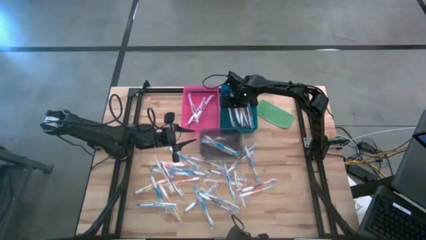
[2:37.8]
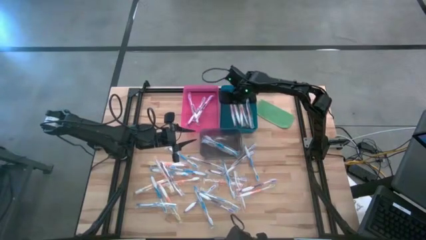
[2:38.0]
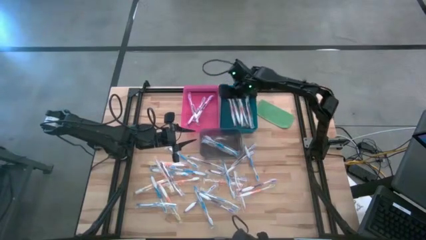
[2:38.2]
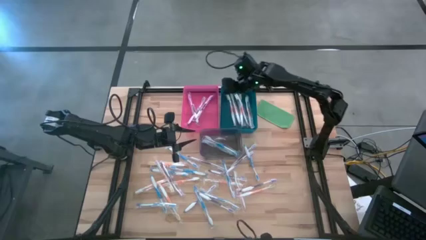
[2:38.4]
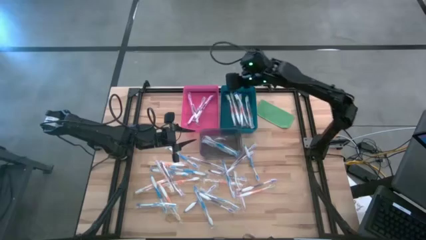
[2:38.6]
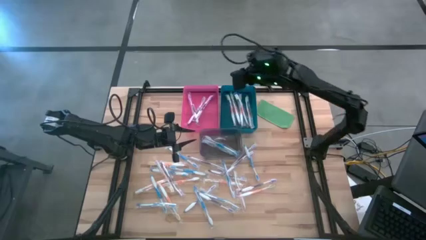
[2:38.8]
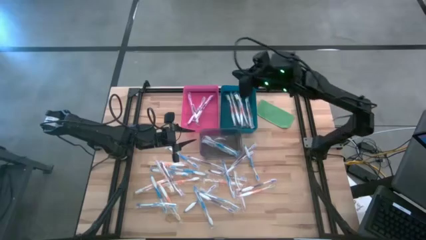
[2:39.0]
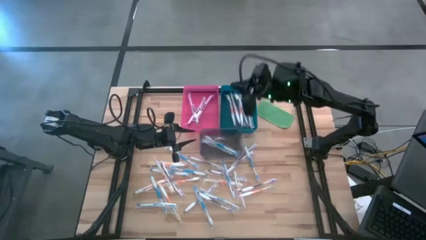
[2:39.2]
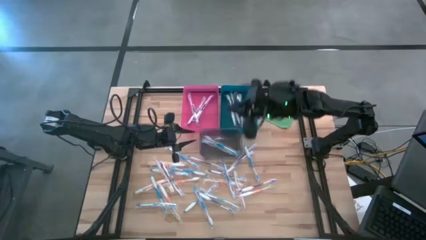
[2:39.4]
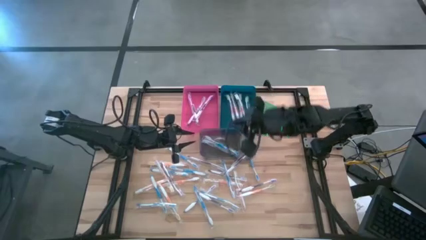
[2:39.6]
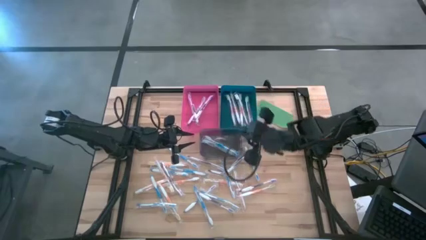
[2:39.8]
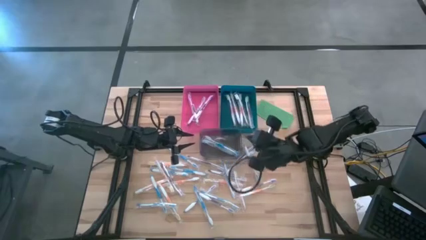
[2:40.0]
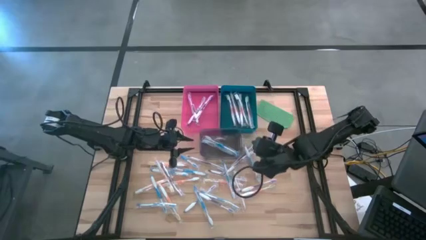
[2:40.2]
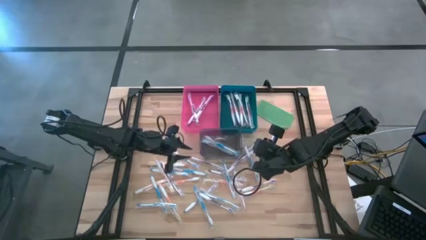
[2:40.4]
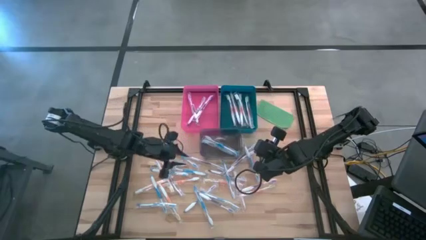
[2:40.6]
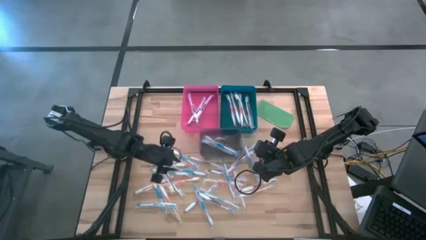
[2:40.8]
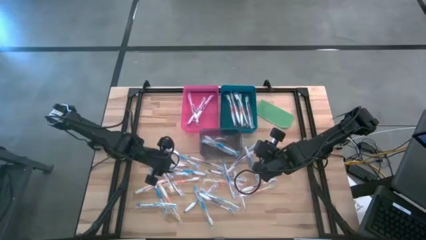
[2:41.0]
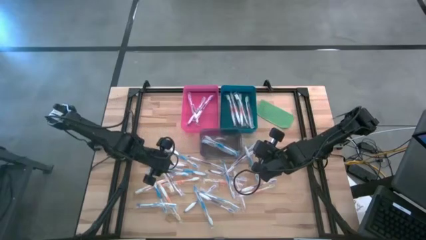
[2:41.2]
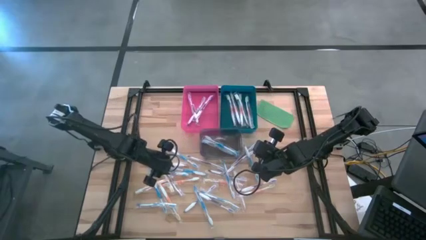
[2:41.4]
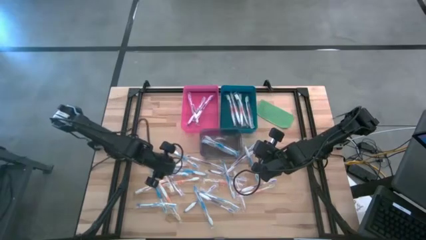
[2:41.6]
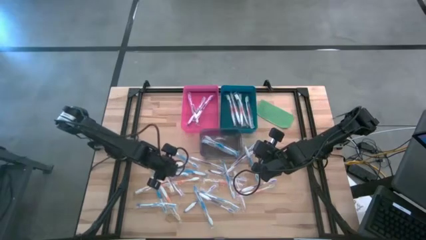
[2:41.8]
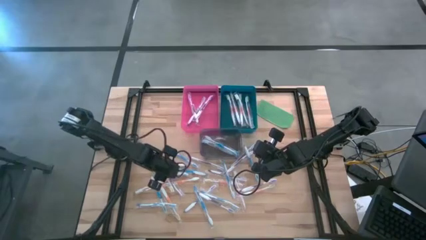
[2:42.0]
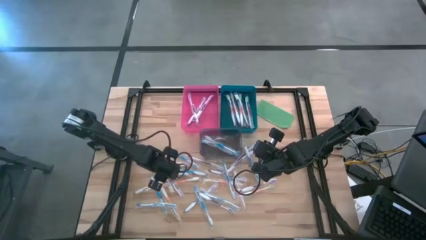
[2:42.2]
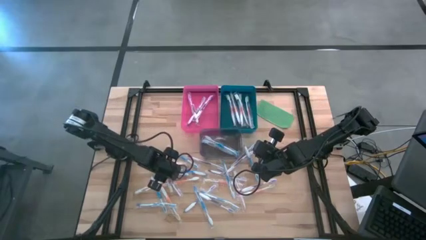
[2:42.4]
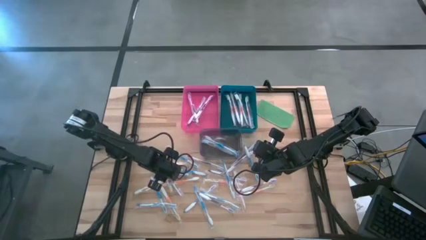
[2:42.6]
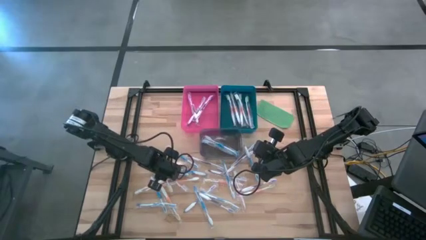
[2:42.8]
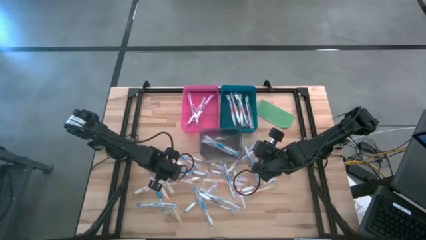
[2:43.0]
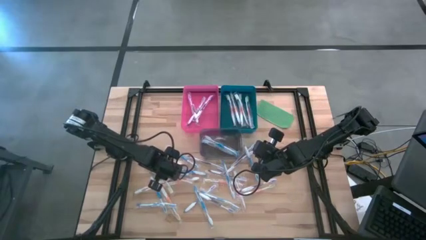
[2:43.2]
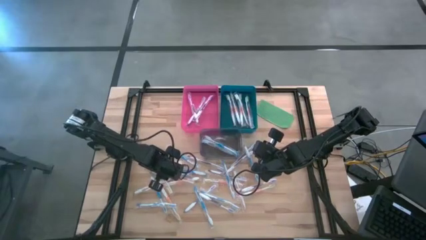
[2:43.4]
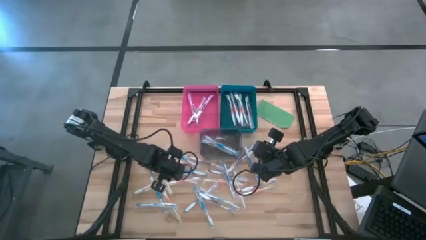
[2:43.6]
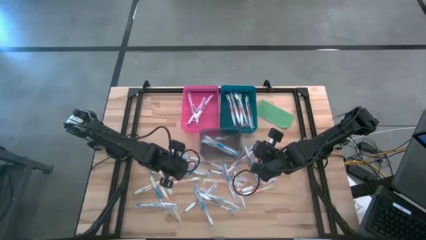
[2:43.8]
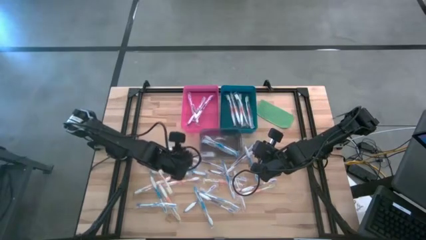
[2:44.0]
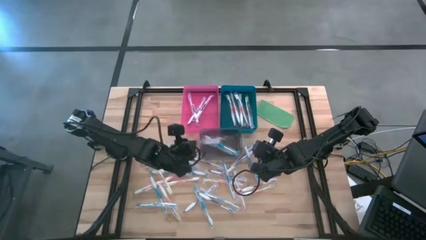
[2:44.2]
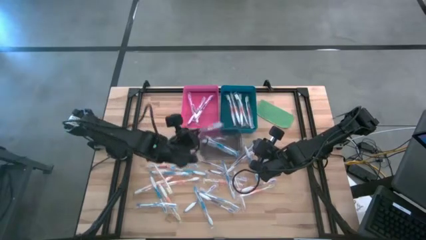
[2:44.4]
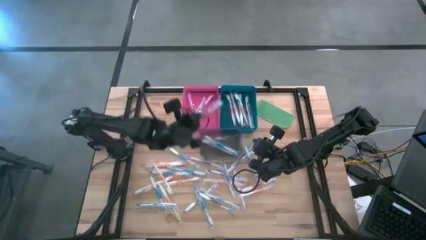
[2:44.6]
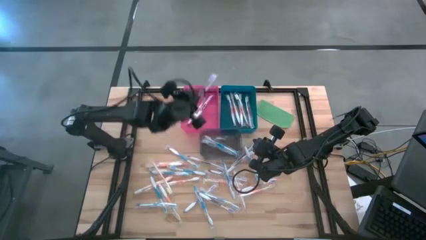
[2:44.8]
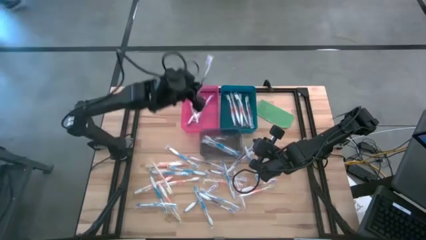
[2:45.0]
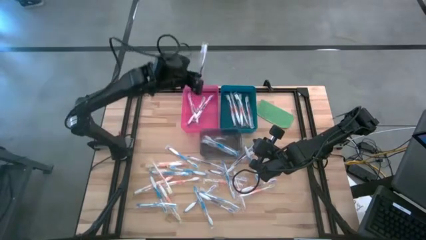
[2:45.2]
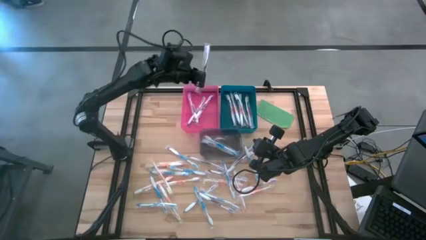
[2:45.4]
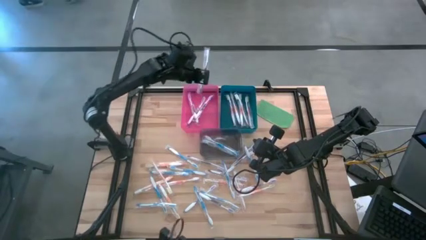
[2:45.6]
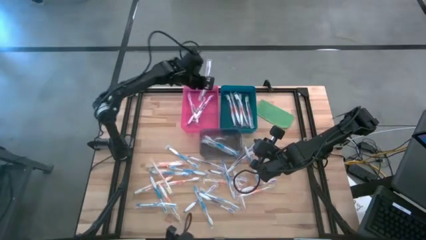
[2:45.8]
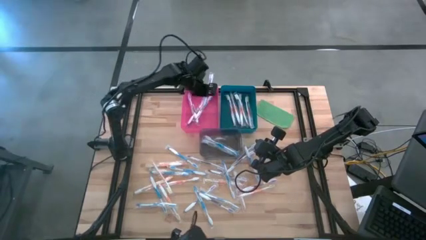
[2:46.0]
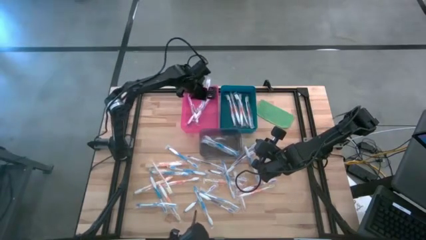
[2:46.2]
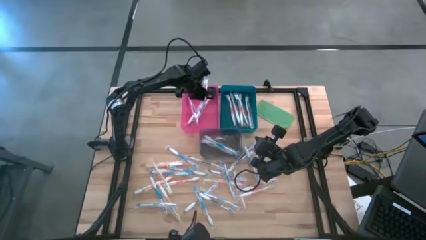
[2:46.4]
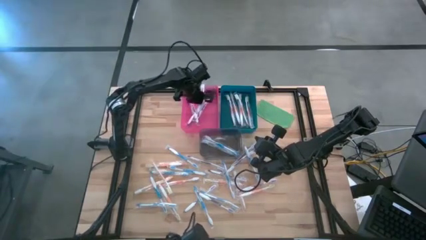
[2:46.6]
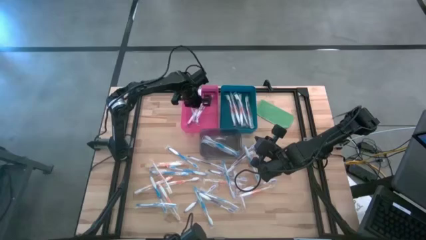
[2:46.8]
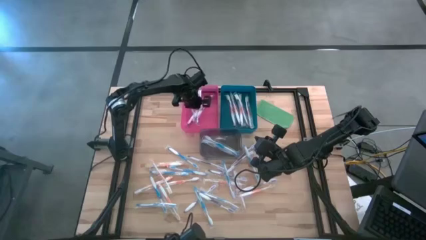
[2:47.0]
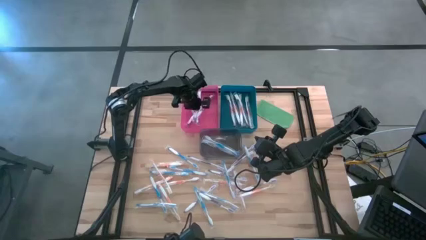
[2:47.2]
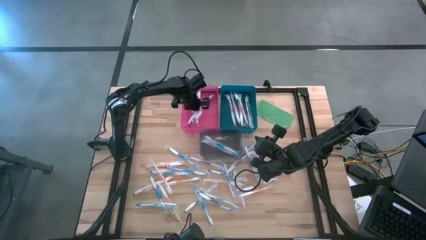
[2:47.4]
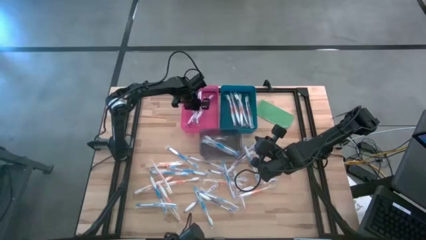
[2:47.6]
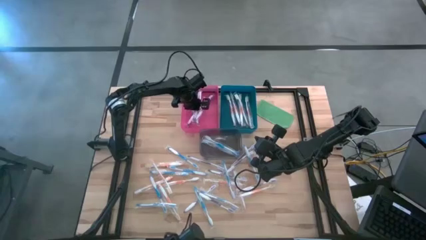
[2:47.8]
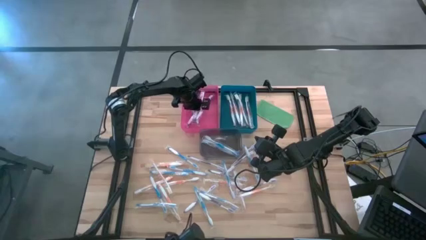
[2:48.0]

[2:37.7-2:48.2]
Task: Pick & Place Toothbrushes
Put the purple toothbrush into the pink bin

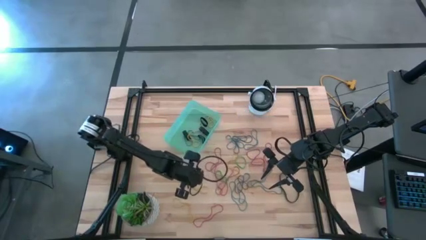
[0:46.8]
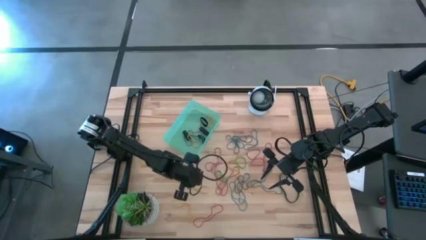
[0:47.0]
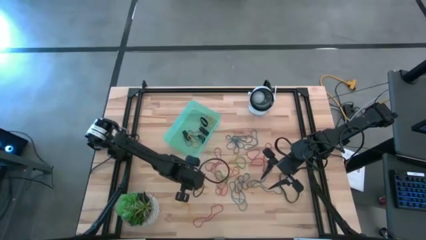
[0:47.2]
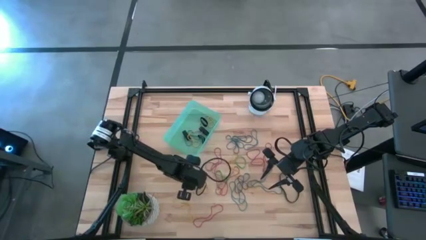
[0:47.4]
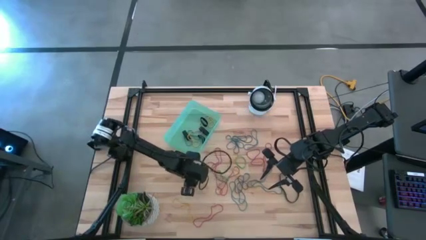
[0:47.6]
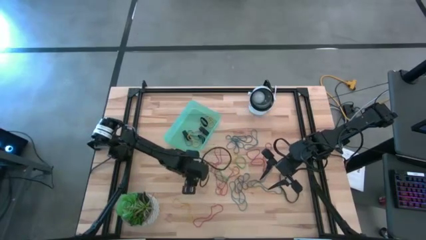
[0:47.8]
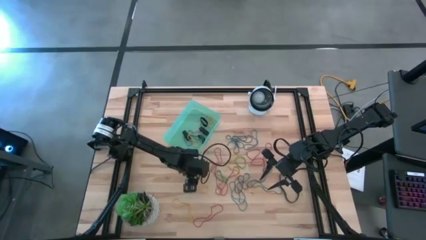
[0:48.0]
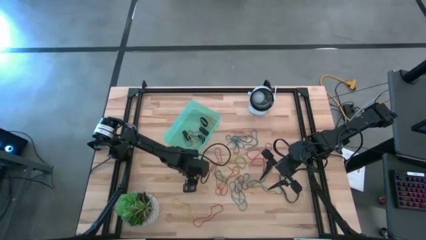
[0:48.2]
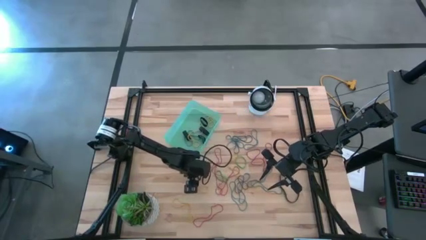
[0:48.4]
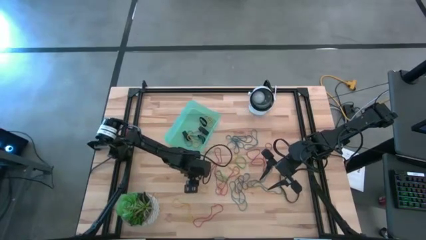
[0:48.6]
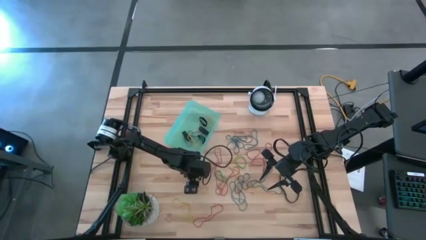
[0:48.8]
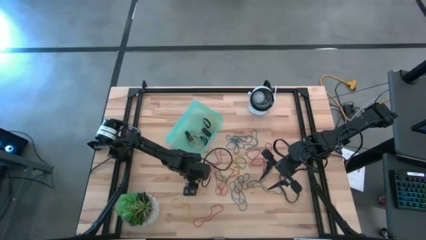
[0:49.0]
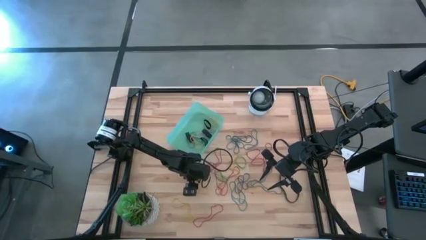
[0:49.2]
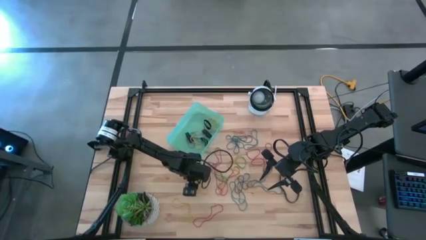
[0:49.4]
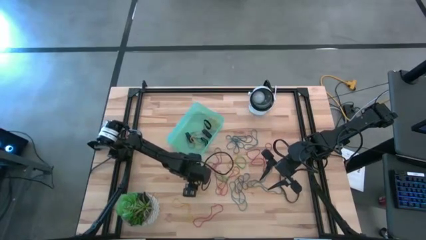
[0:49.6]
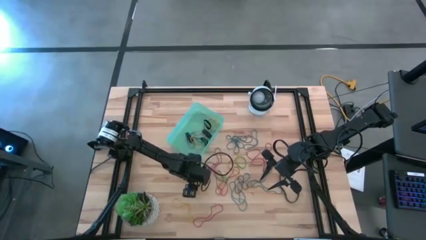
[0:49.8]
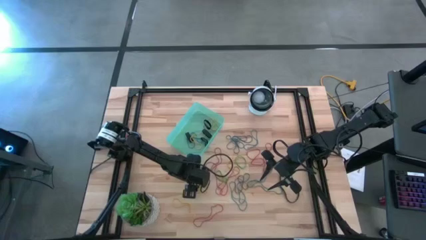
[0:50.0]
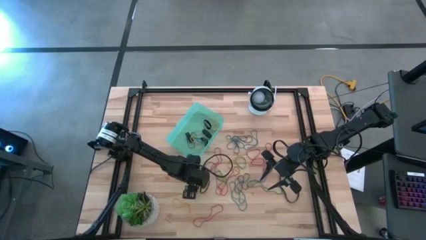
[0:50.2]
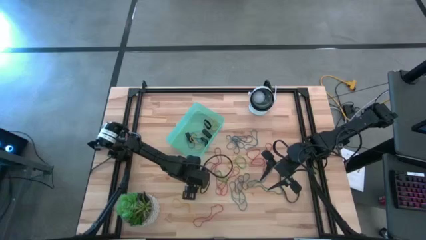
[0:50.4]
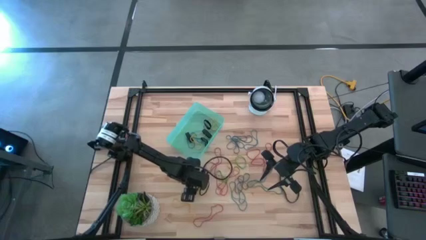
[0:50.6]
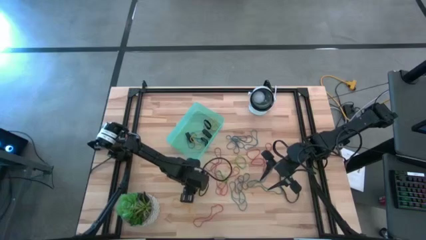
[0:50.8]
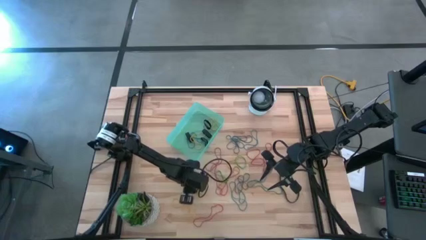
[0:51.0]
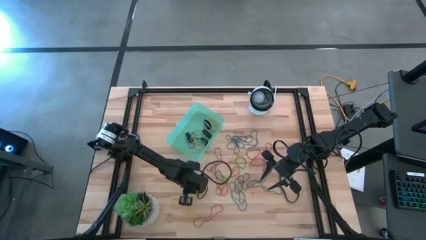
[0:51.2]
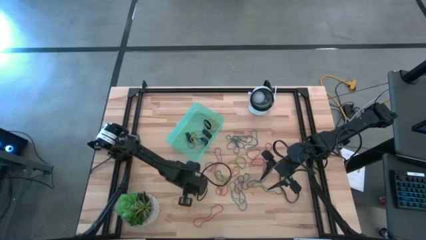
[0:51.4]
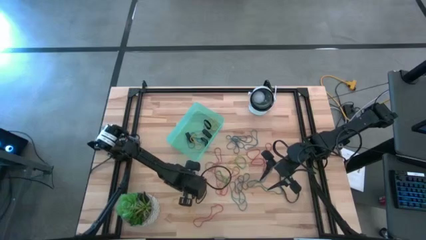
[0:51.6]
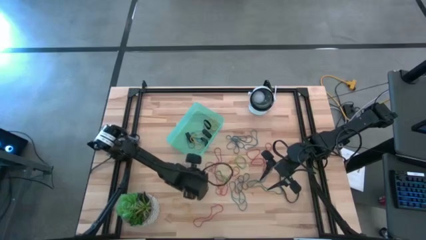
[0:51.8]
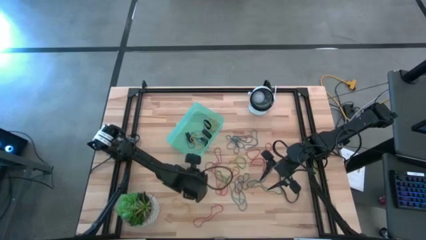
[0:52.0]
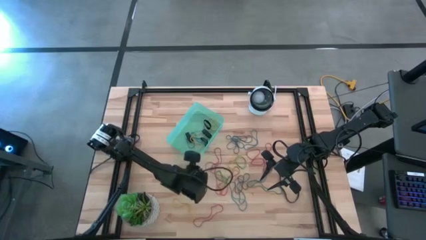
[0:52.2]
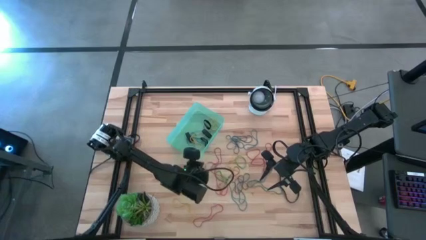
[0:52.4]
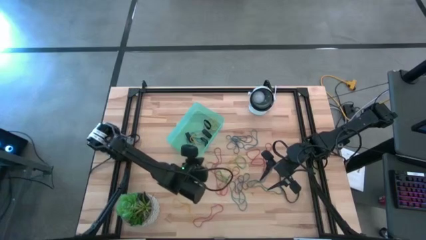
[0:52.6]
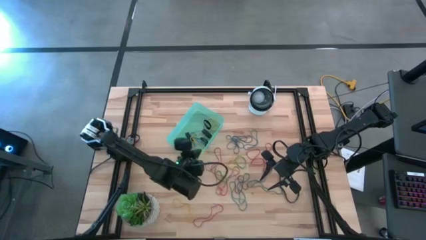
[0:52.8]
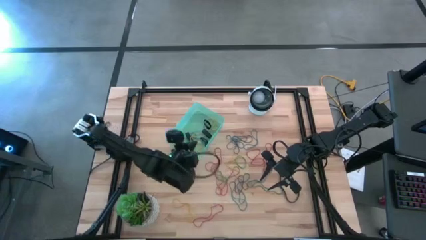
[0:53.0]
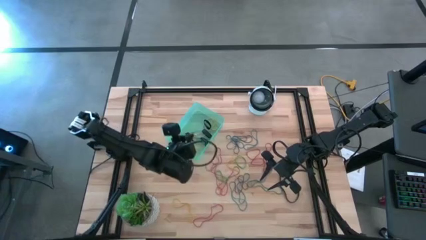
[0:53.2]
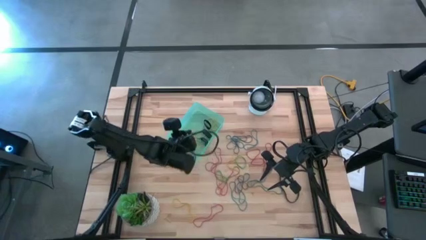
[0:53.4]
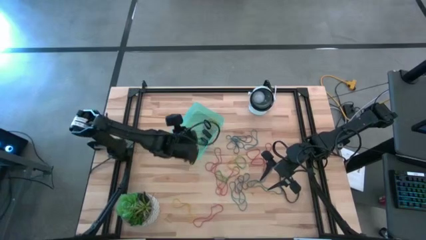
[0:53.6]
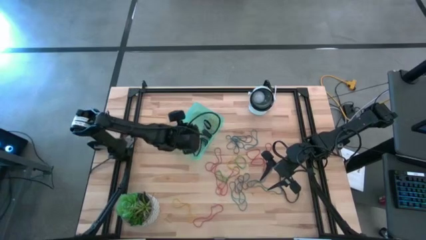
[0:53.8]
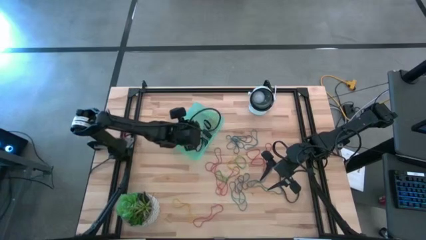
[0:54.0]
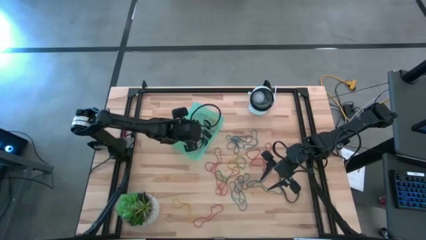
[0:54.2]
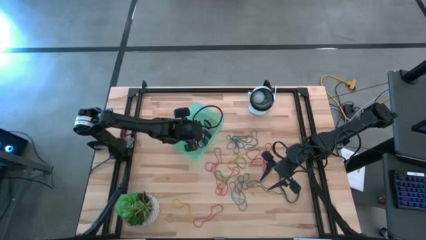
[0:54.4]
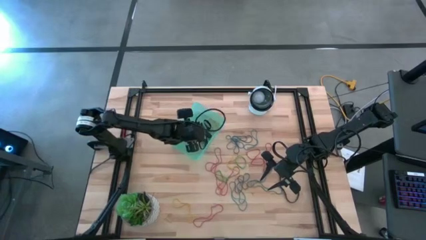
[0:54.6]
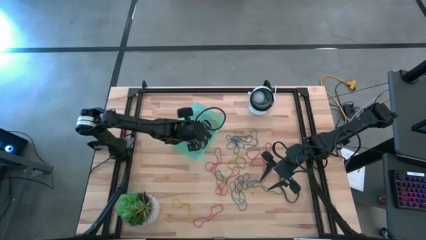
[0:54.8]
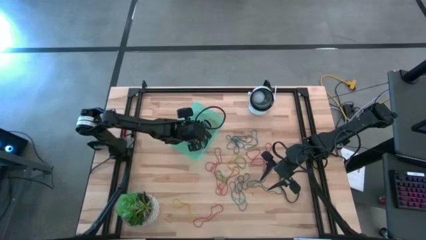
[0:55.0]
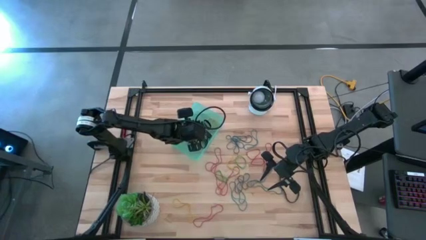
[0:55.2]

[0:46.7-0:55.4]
Task: Pick and place rubber bands into bin
Put the yellow rubber band into the green bin
